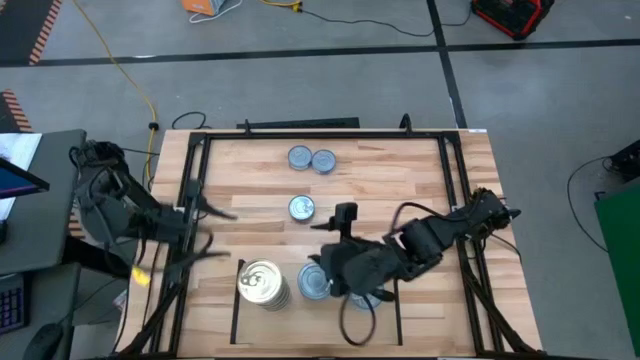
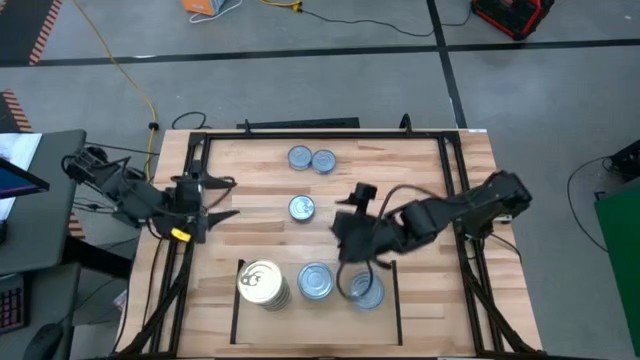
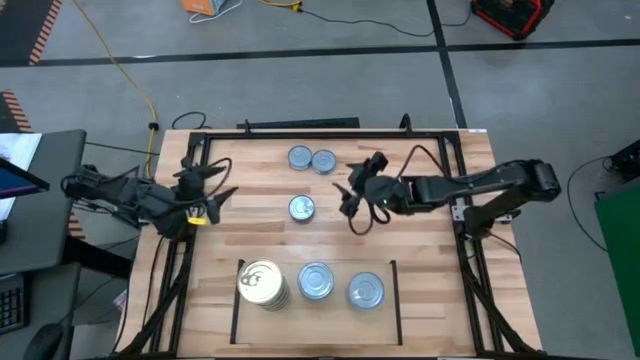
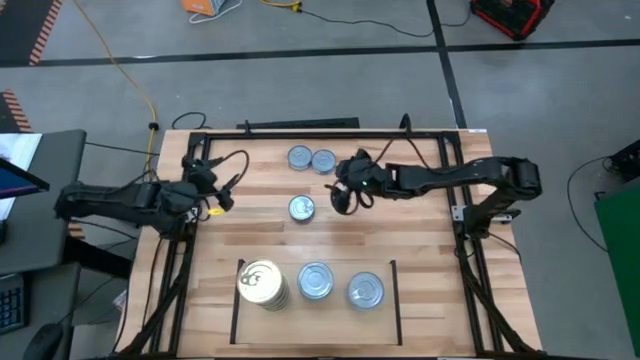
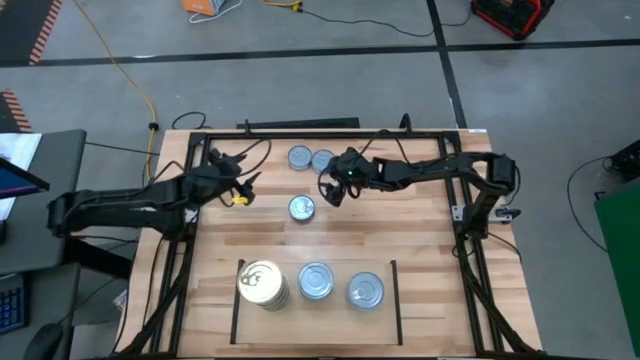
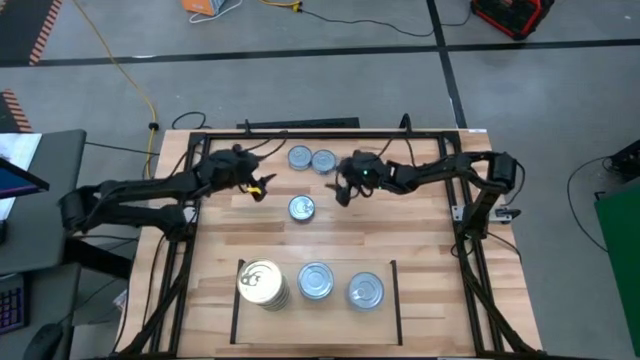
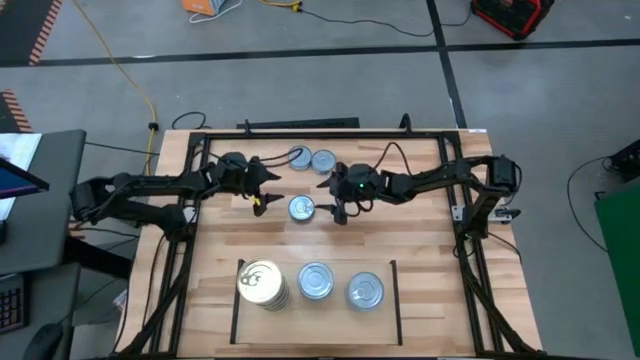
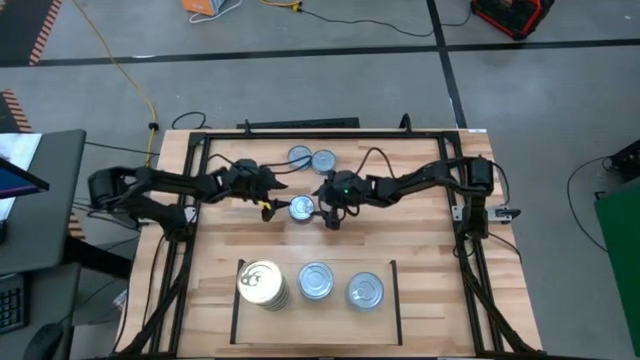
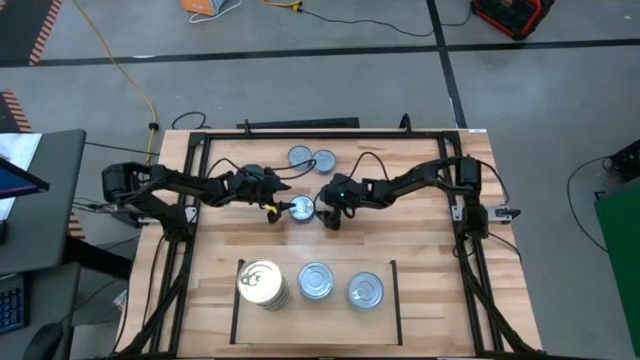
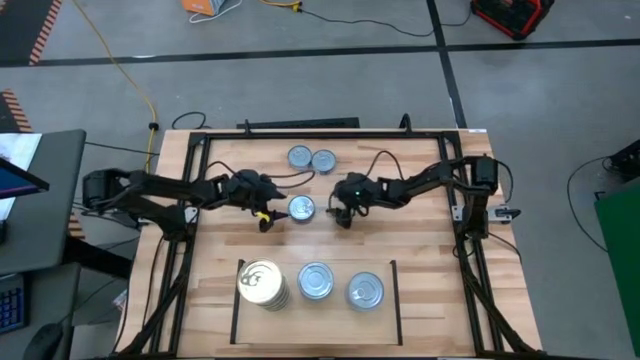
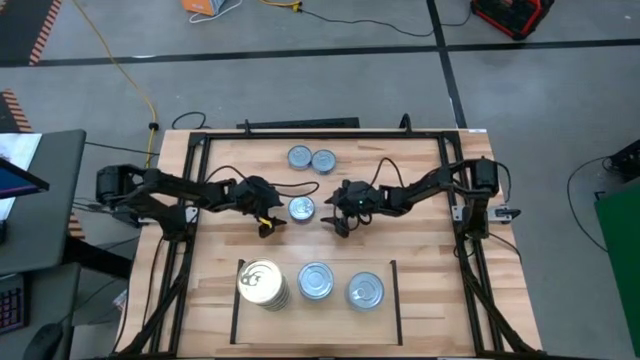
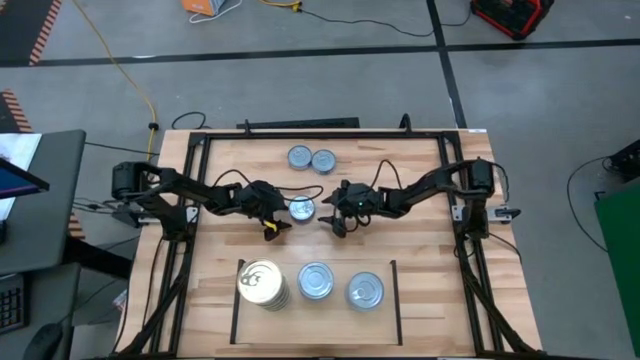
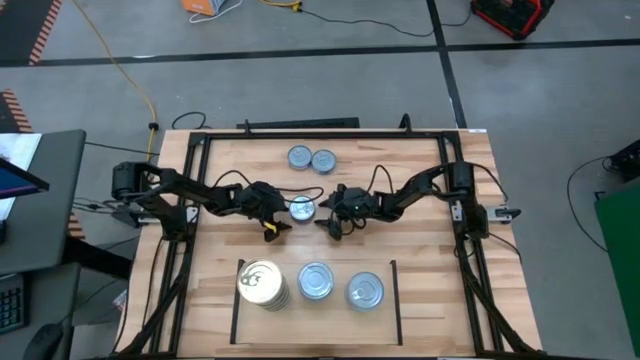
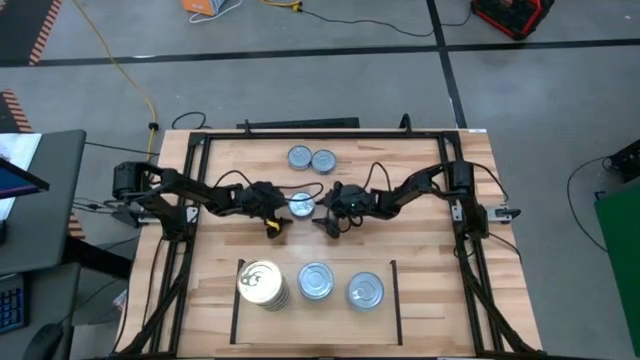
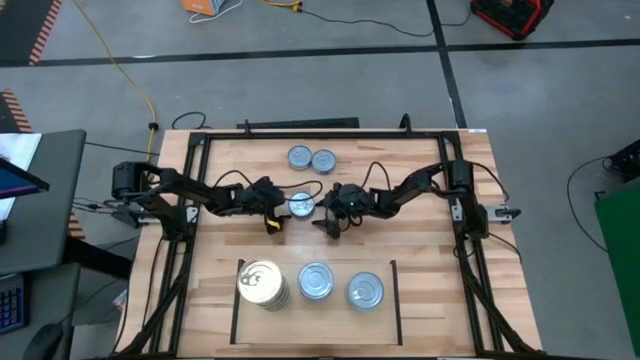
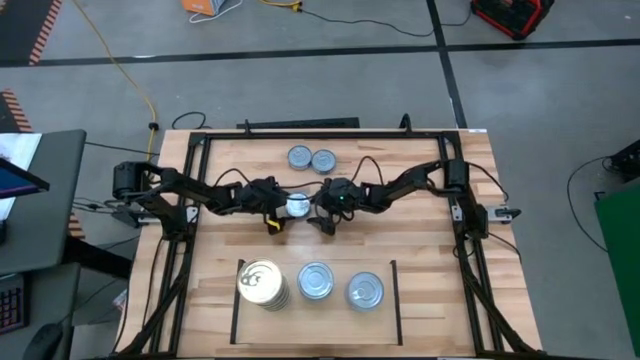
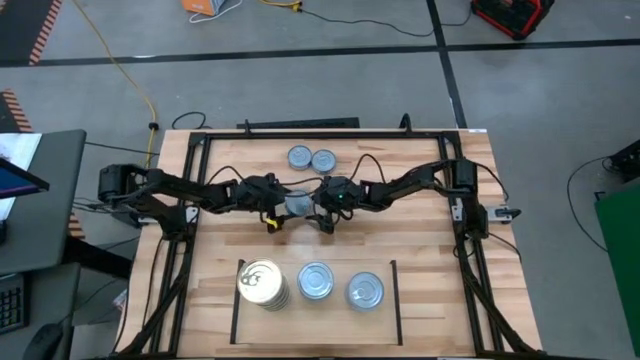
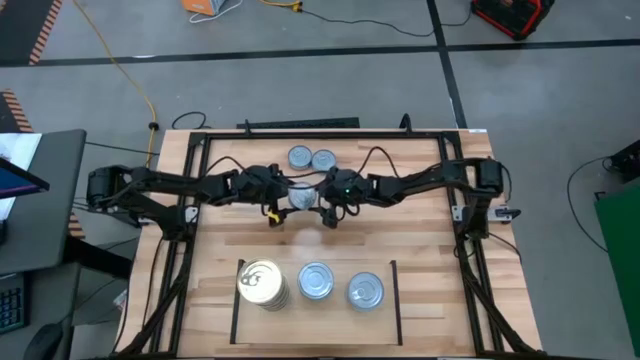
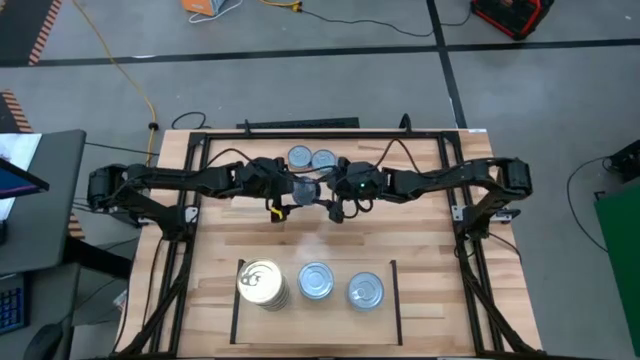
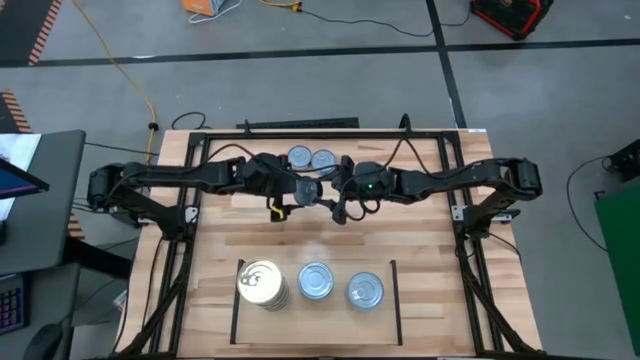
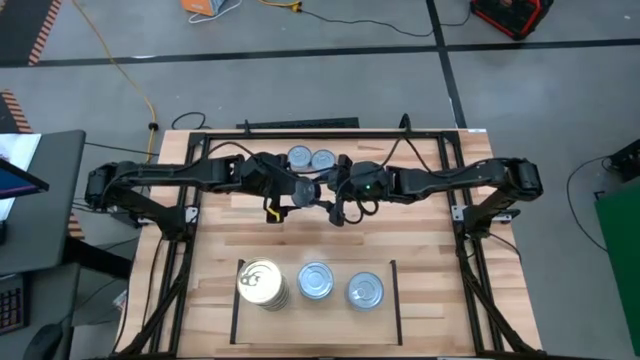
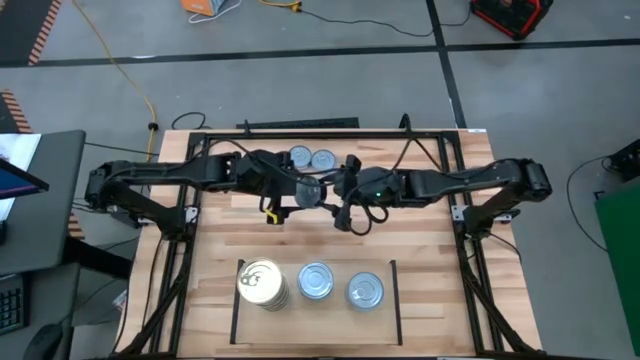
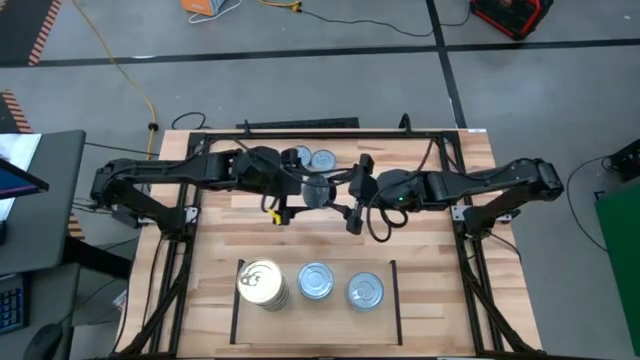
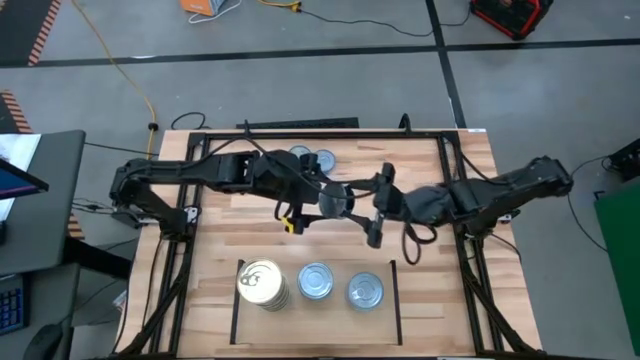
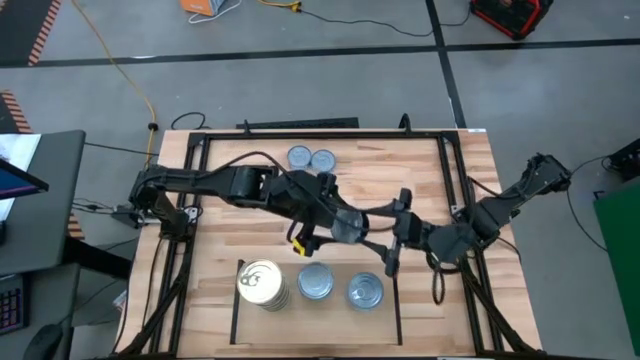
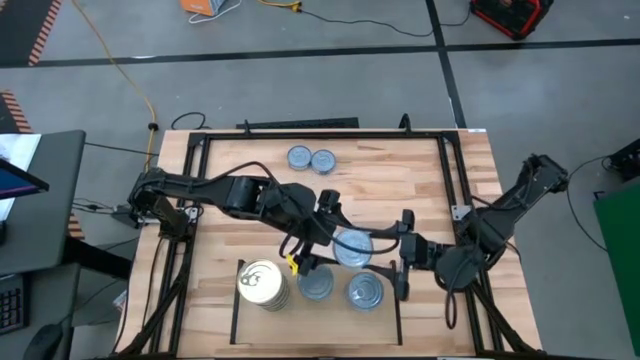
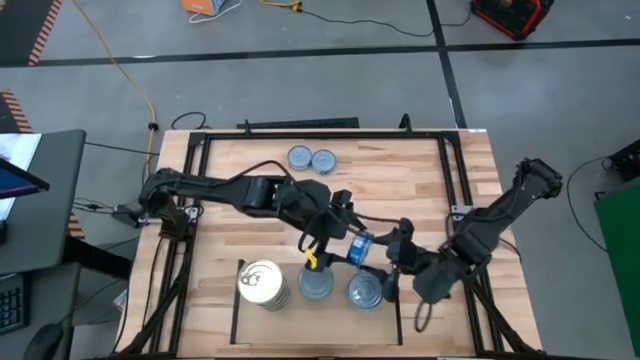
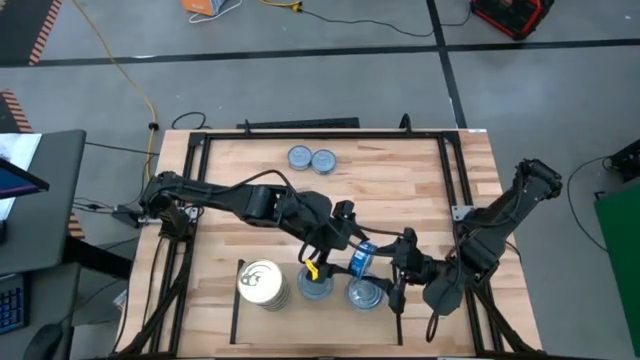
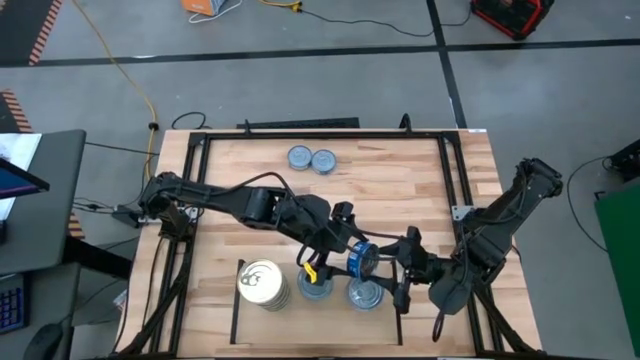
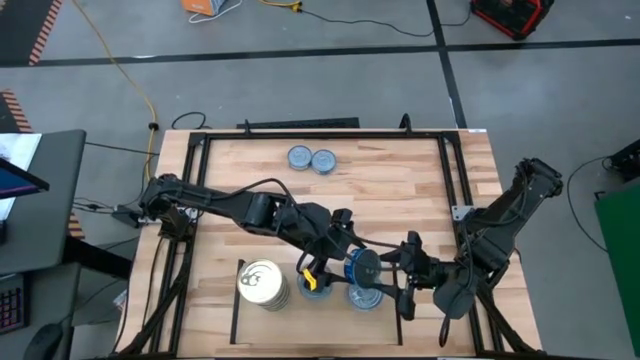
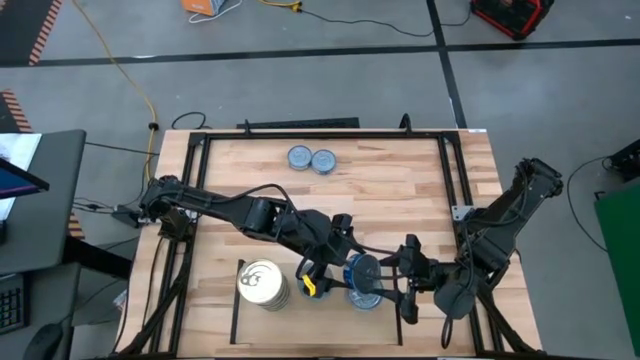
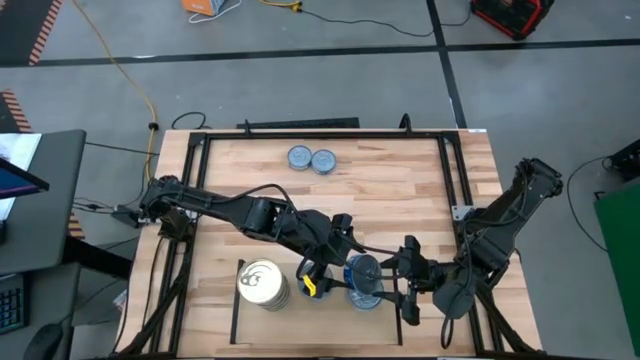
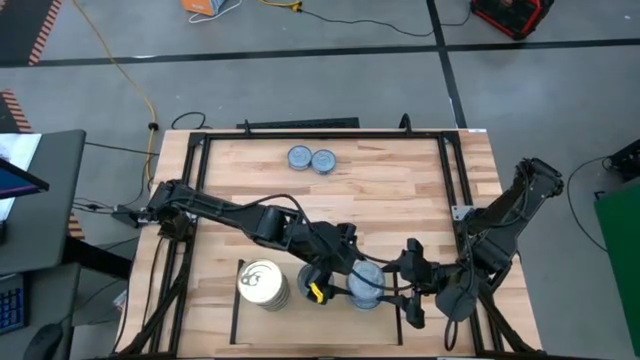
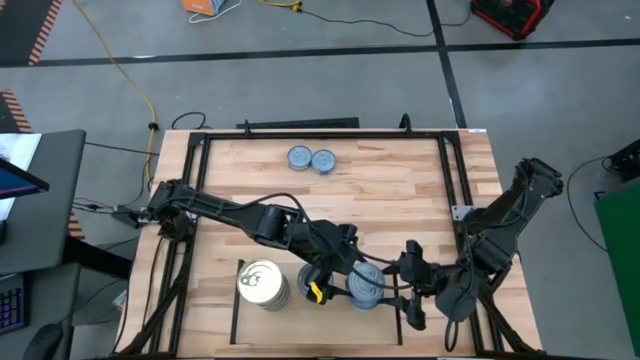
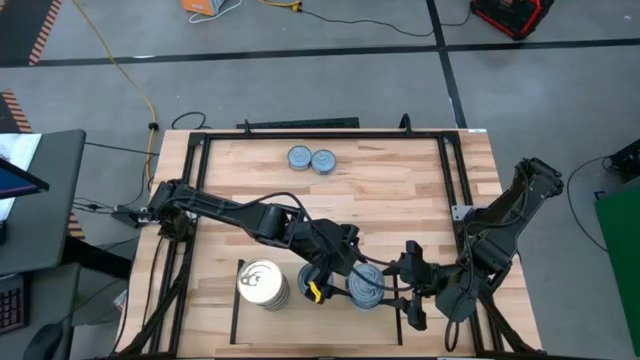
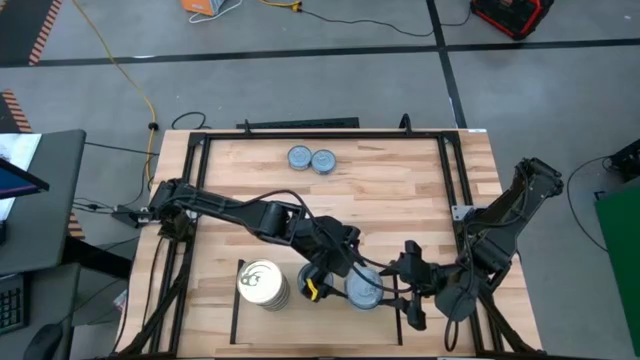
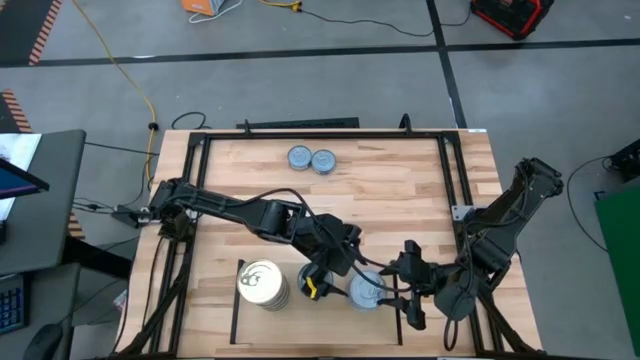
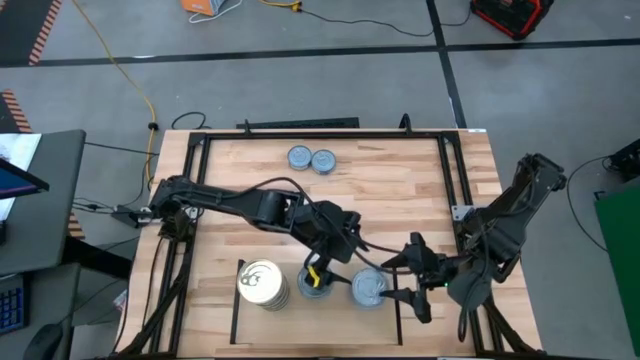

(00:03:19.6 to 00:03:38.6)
Task: Stack canned seafood by type on shelf
Put the bottom blue tuna can on the top of the right stacked tuna cans on the shelf

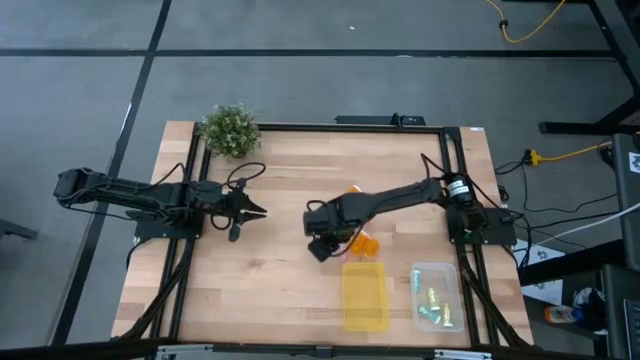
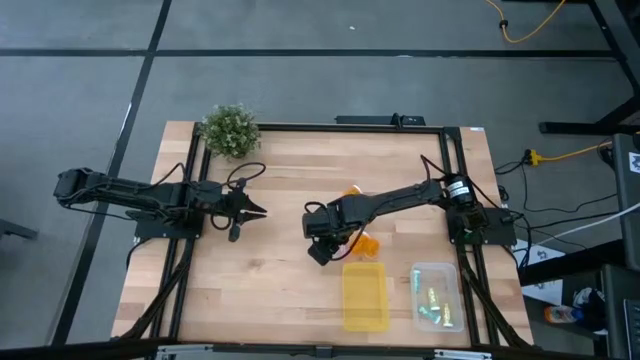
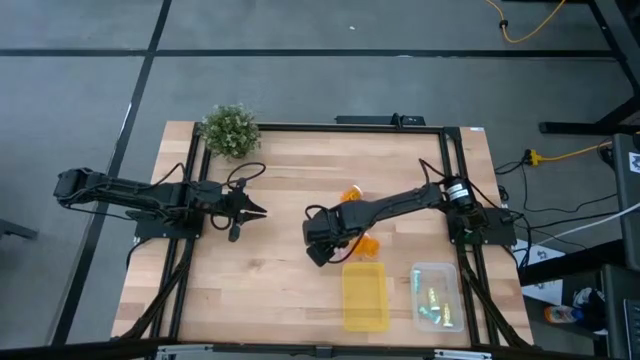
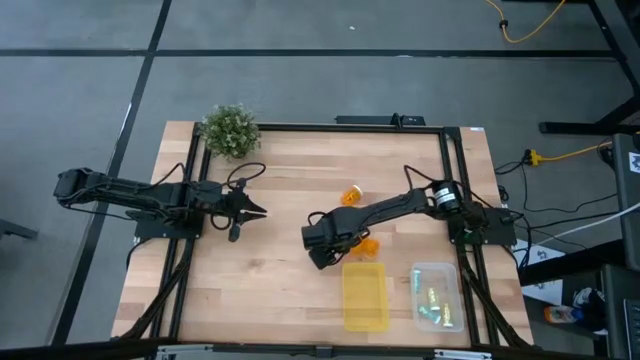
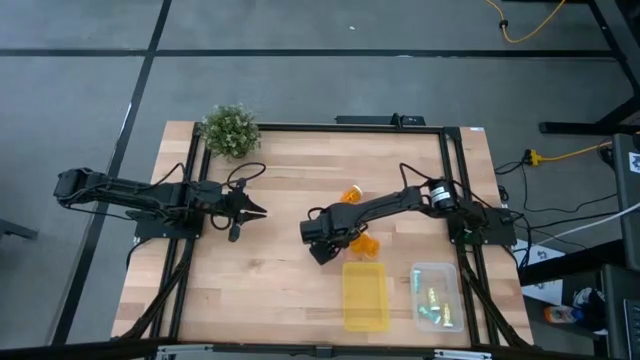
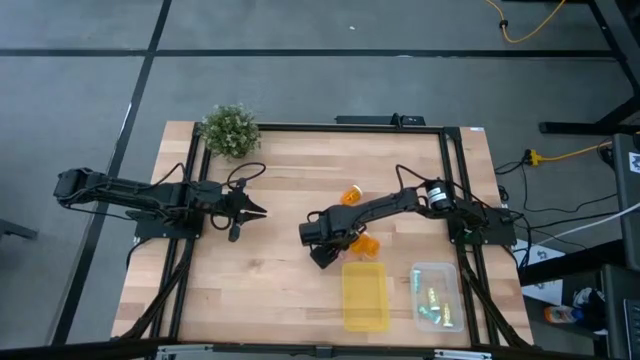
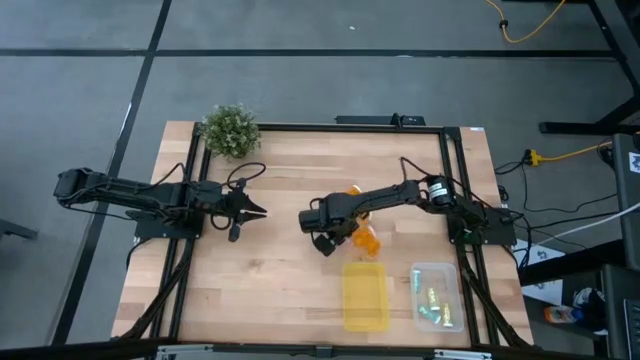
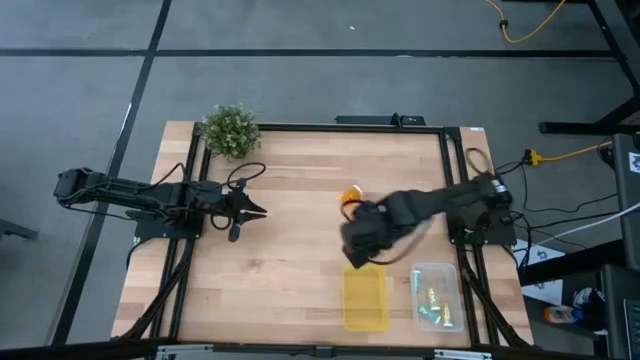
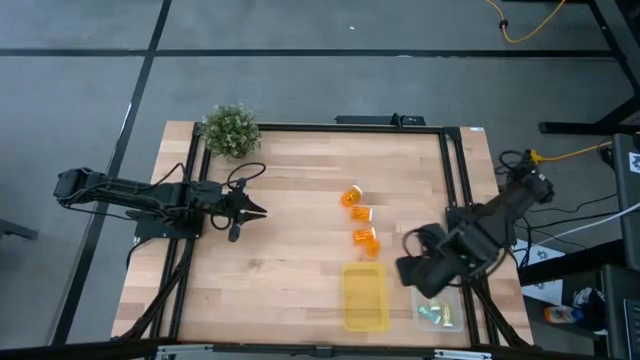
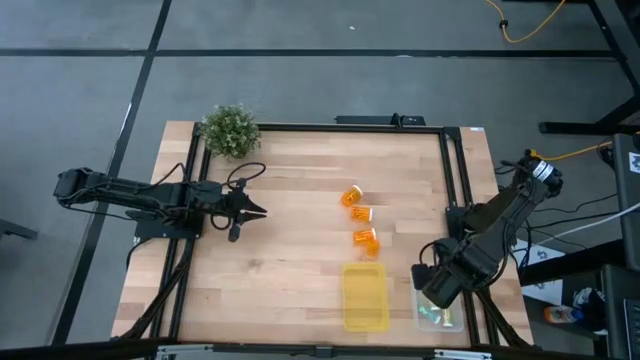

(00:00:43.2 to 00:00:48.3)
Task: Pick and place medicine bottles into bin by pill shape (circle, oval)
Put the pink tablet bottle into the transparent bin
